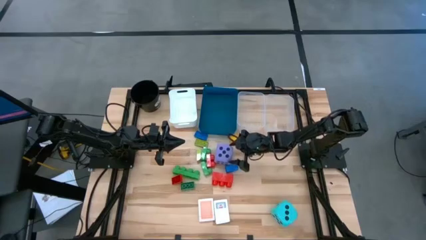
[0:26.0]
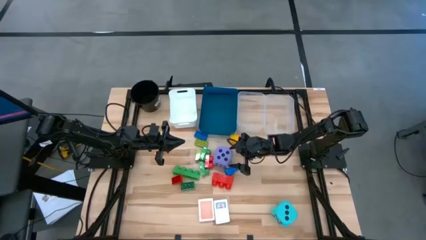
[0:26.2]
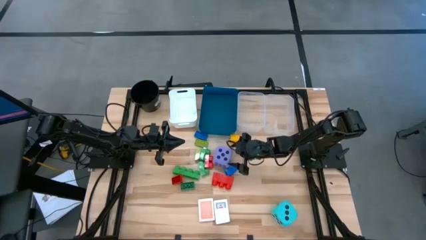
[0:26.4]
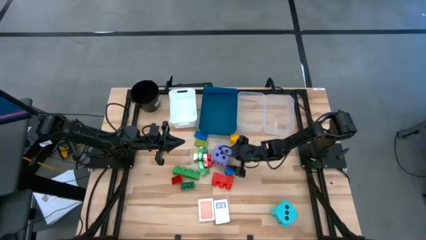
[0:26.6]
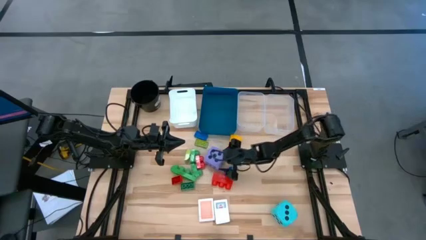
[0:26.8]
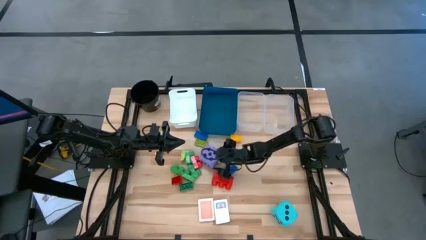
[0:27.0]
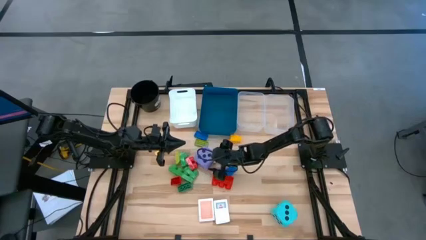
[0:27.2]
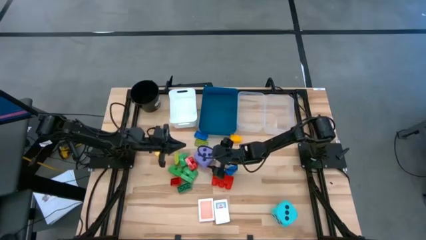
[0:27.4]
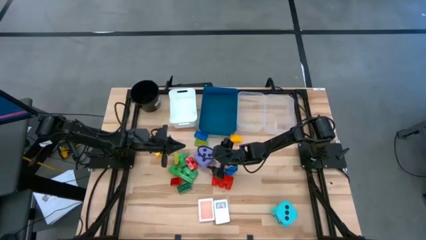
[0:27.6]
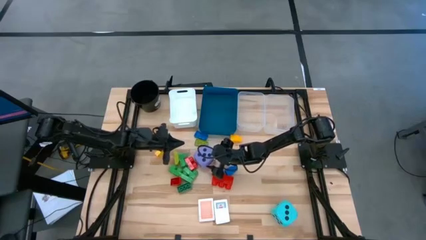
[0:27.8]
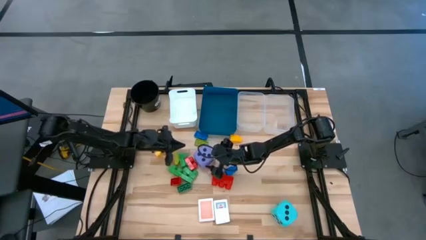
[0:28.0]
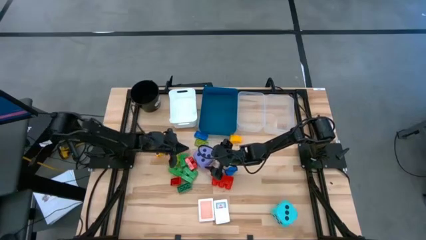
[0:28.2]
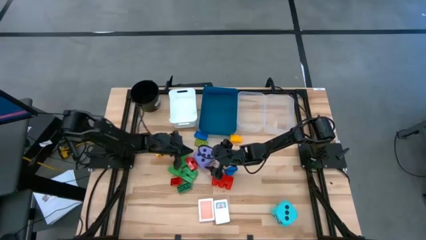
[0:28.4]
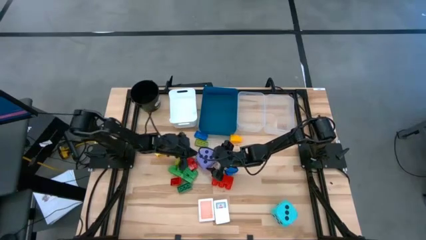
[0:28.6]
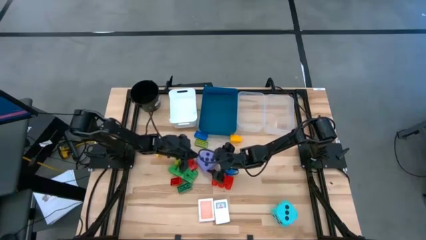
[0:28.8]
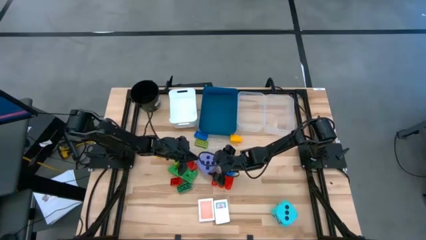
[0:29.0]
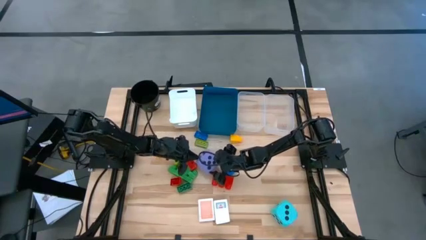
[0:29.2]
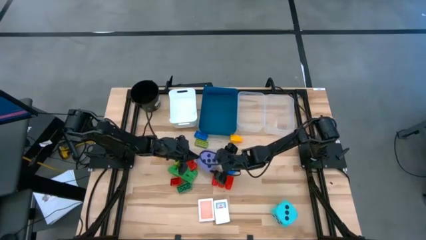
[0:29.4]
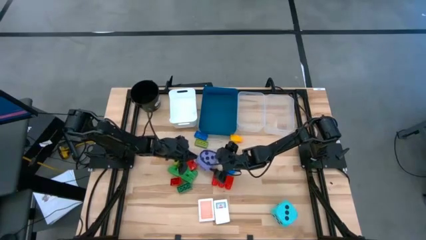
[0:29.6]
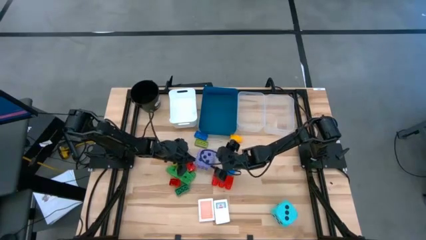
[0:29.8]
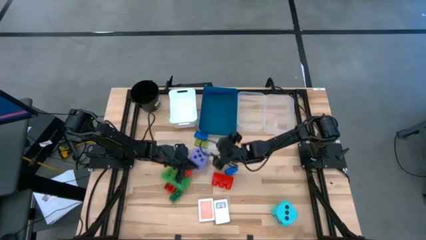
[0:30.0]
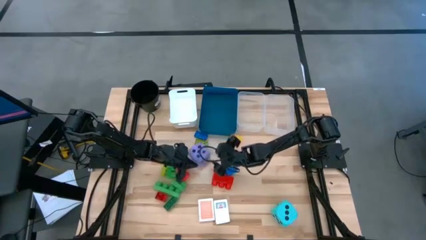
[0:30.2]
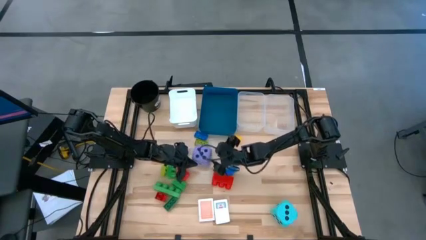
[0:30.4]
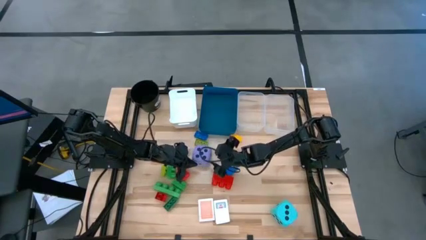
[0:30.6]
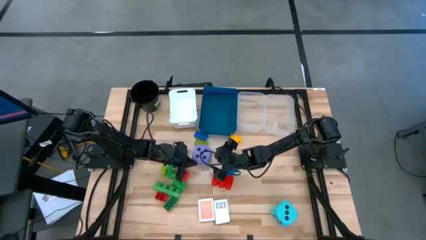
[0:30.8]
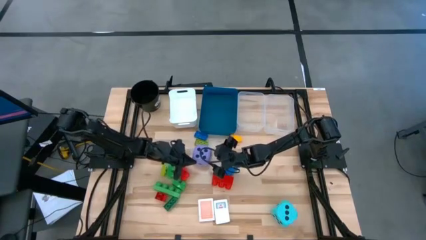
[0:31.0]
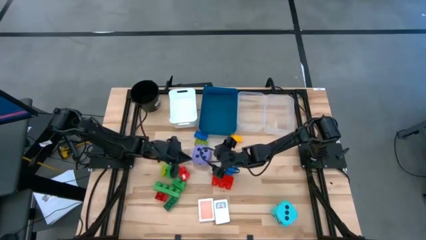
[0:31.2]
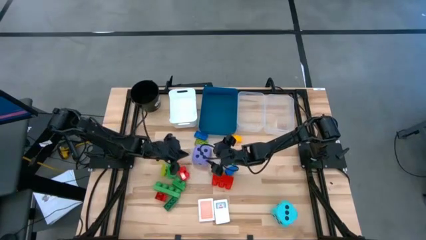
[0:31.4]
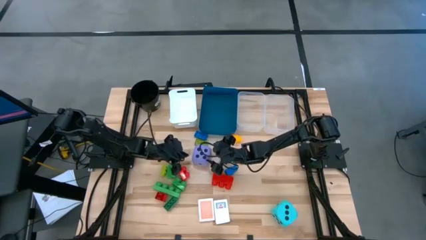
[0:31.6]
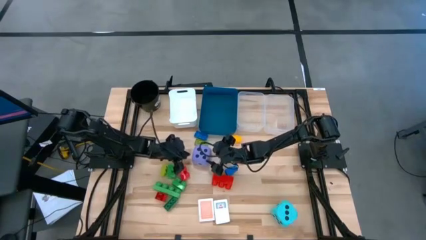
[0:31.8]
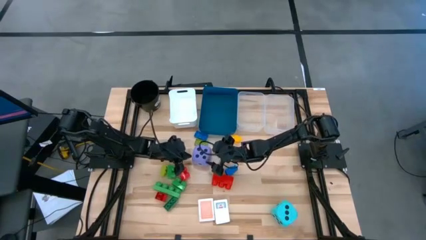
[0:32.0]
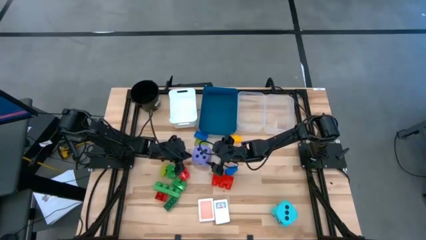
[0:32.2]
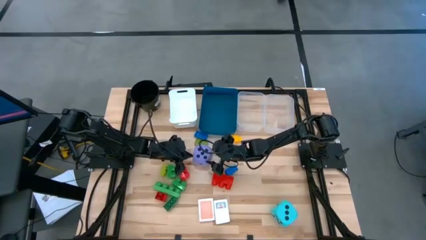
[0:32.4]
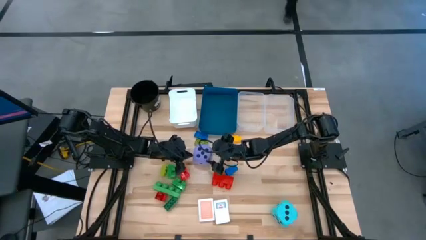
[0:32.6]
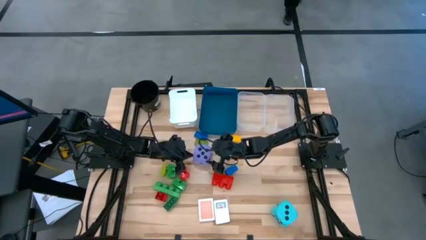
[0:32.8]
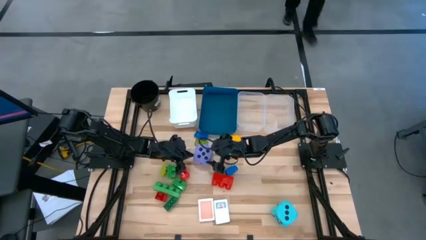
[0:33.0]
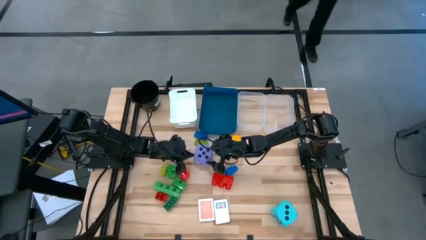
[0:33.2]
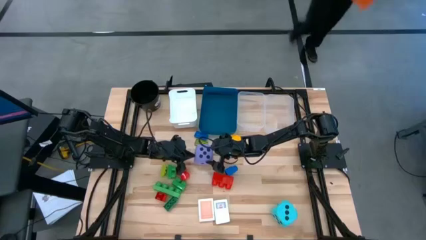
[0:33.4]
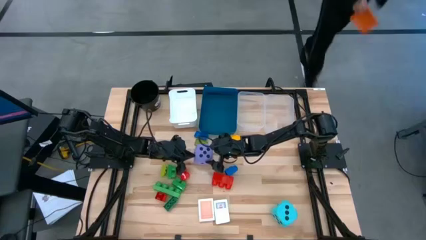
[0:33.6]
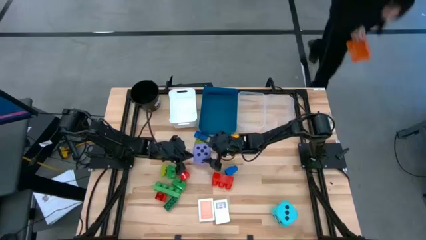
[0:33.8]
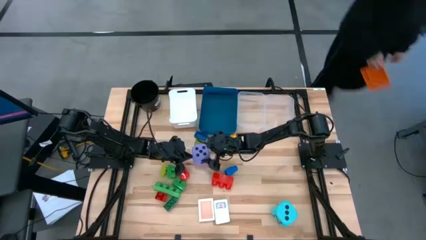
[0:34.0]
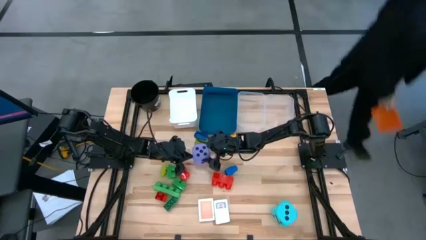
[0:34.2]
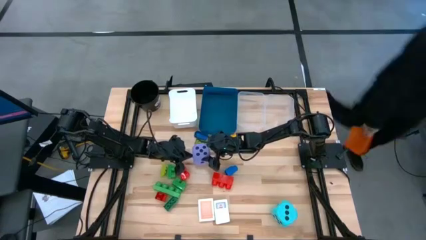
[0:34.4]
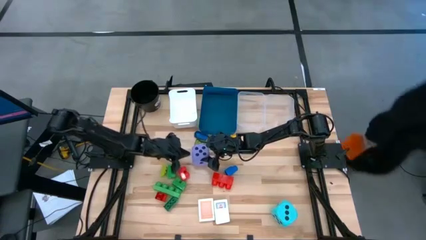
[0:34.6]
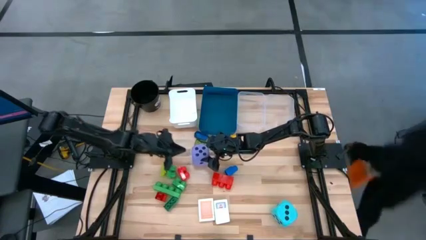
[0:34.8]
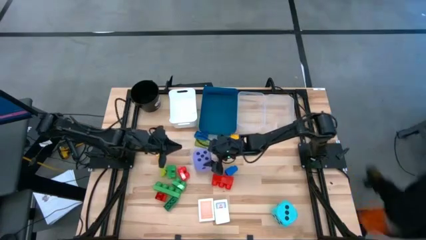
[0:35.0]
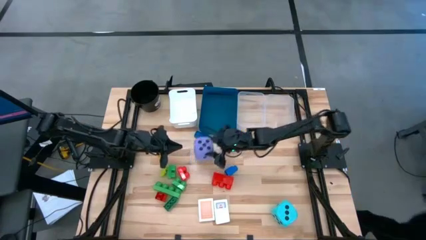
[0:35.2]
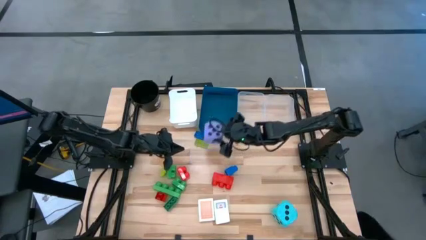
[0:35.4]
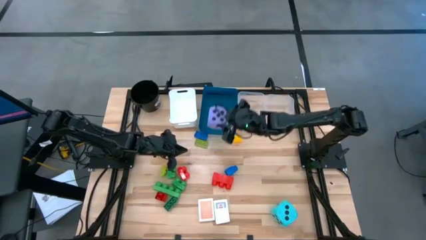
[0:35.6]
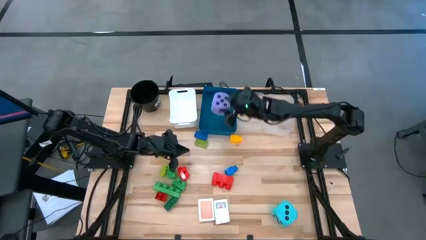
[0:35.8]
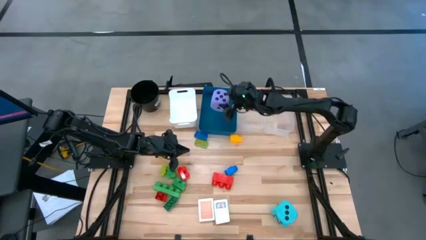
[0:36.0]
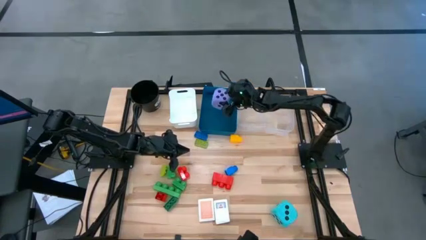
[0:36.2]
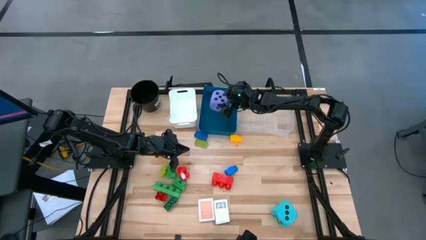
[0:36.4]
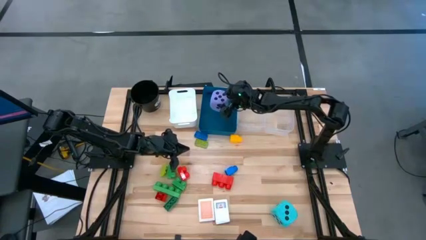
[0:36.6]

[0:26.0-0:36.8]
Task: Pick & Place Toys
Put the violet dice into the blue bin

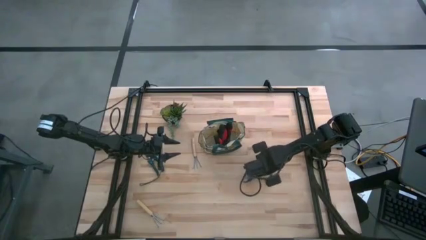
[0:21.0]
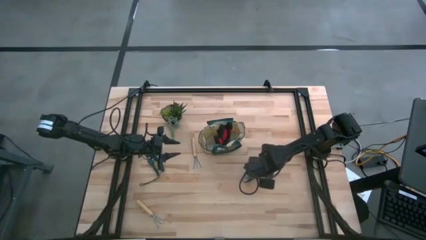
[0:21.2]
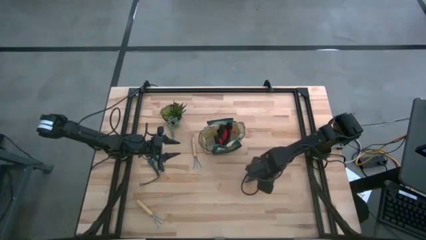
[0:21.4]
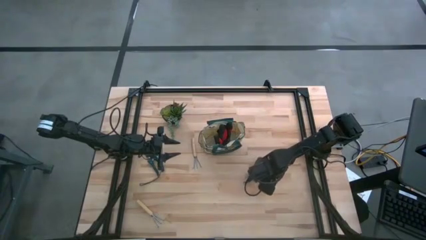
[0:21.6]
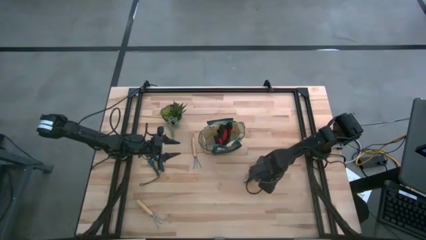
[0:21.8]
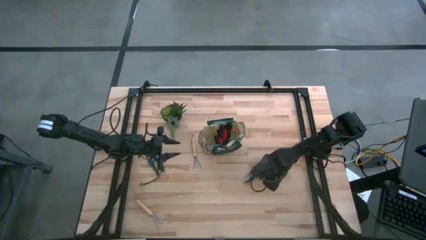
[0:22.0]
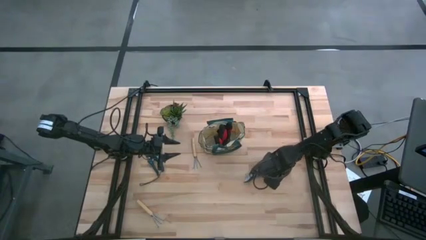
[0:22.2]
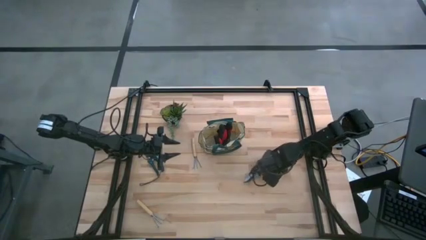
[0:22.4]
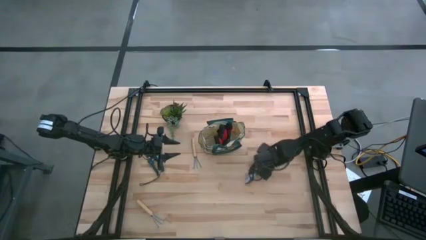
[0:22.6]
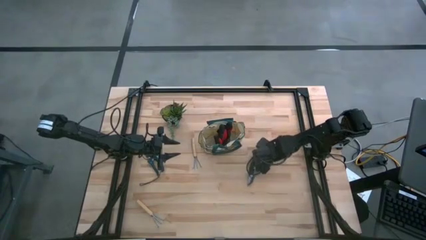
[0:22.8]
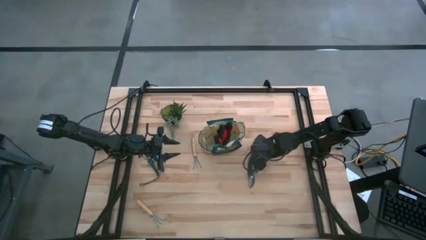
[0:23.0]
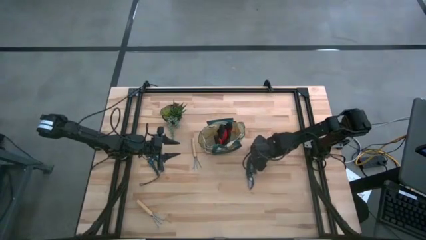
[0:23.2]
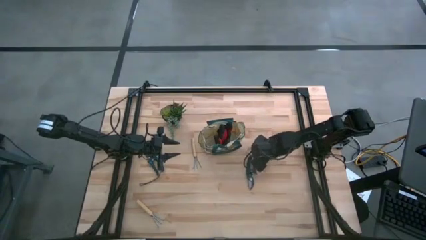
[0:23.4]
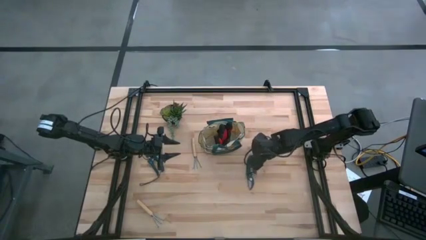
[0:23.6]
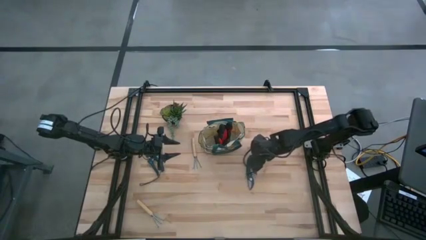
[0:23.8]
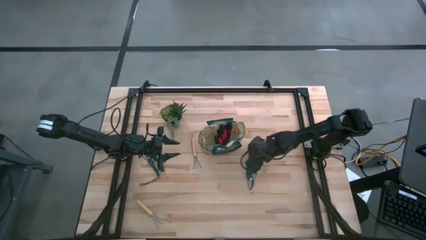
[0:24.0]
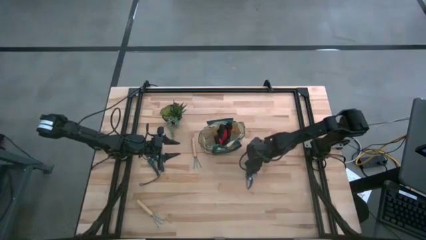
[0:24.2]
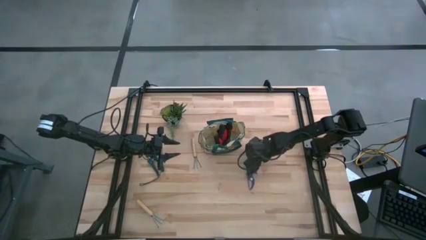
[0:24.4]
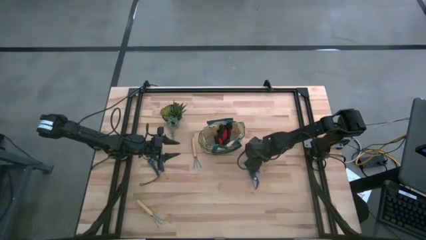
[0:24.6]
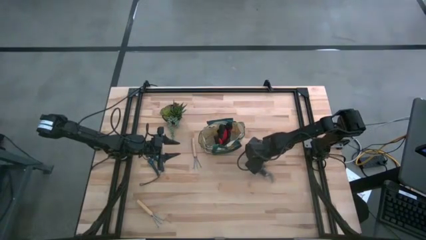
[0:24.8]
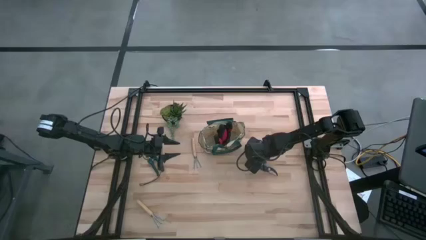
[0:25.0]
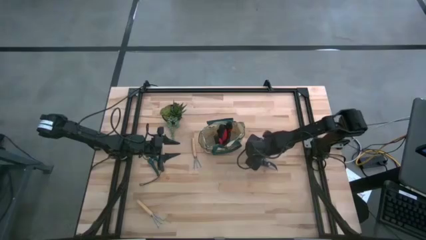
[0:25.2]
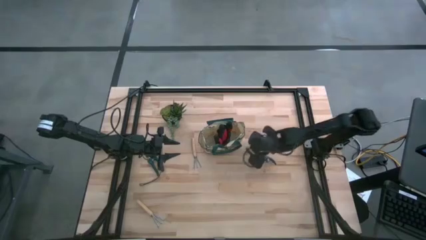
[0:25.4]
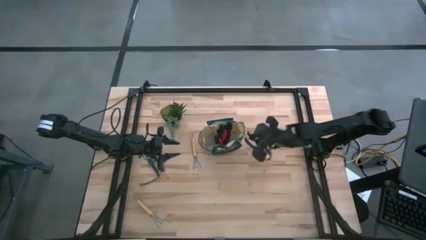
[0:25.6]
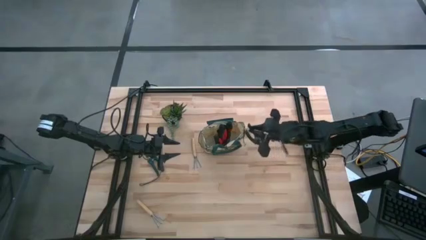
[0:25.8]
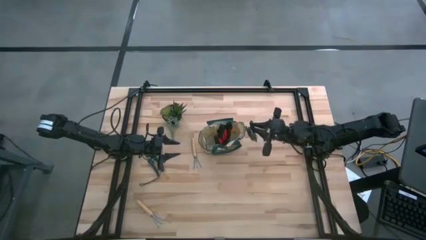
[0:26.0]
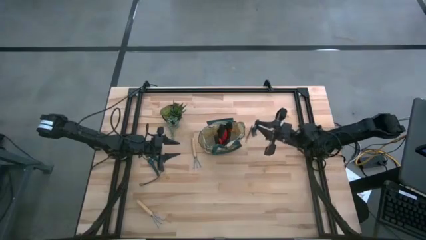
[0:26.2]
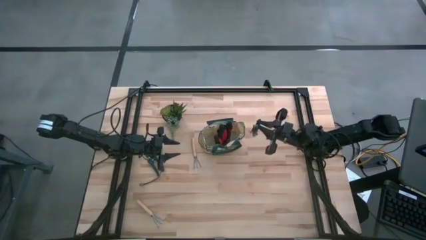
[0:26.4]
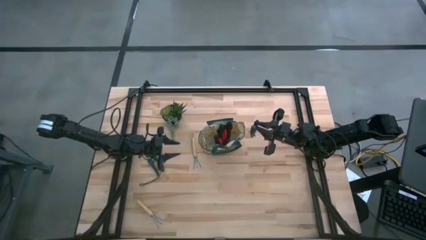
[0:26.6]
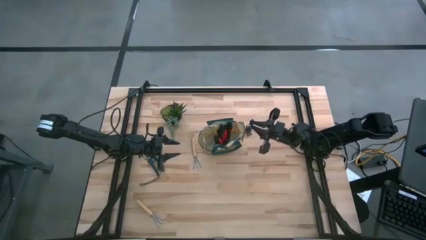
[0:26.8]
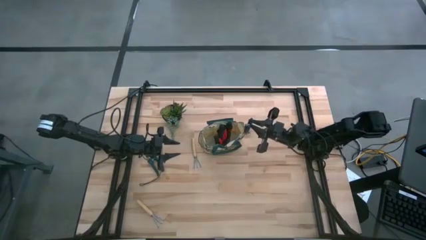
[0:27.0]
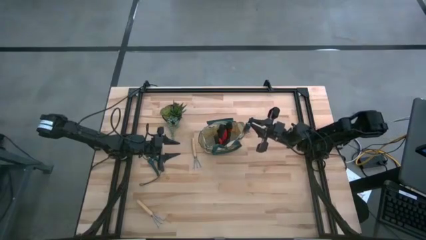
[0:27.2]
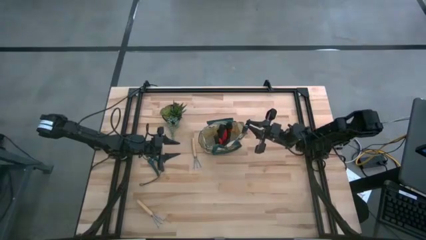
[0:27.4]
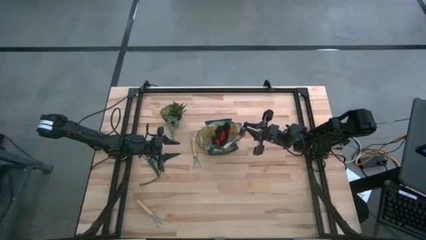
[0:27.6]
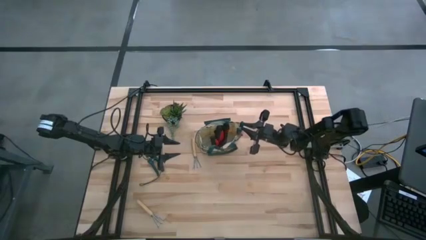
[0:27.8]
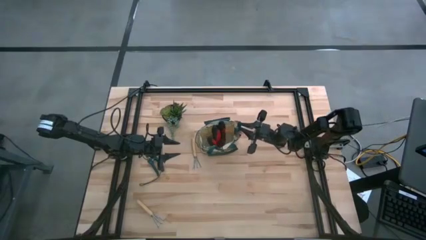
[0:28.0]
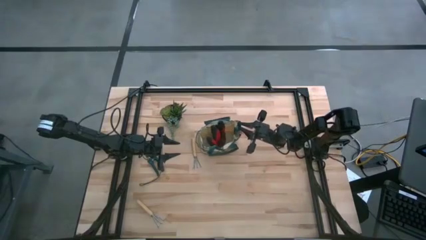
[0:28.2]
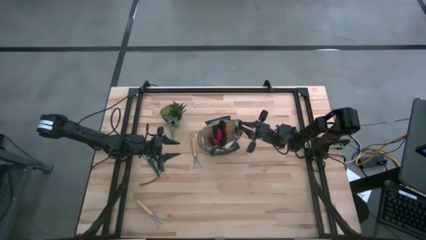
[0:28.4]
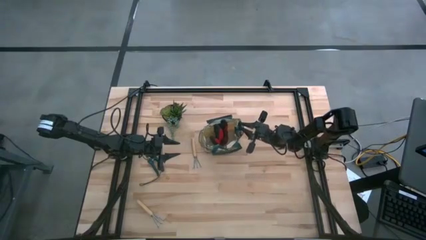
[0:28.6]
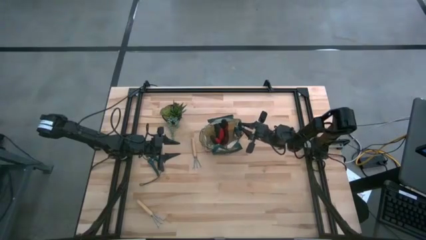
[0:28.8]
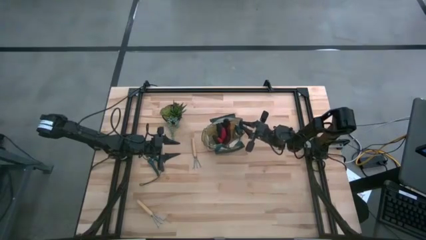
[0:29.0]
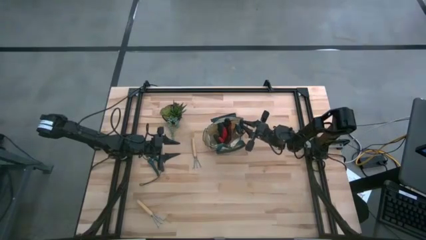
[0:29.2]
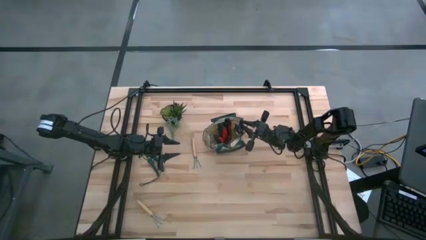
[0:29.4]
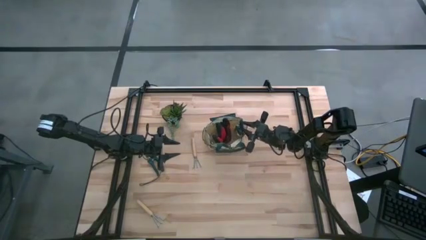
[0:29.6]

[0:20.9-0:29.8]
Task: Pick & Place Garden tools in Gardening bag
Put the green shear scissors into the white gardening bag
